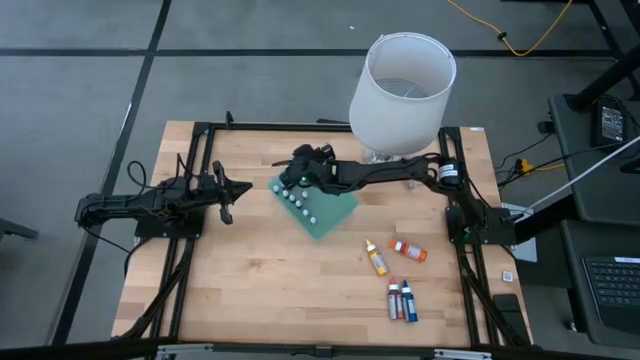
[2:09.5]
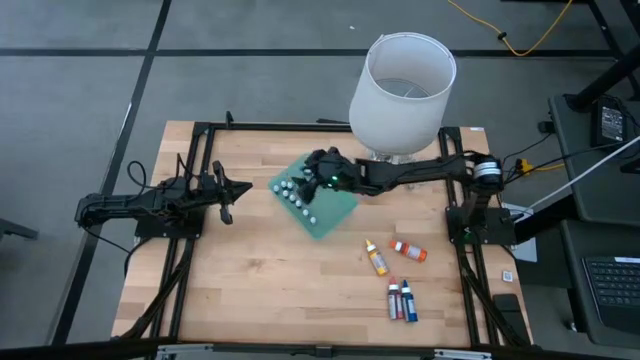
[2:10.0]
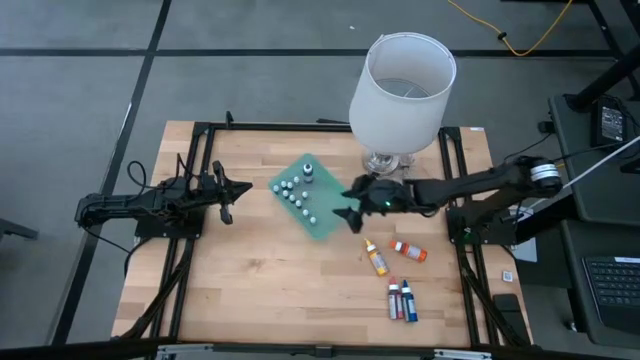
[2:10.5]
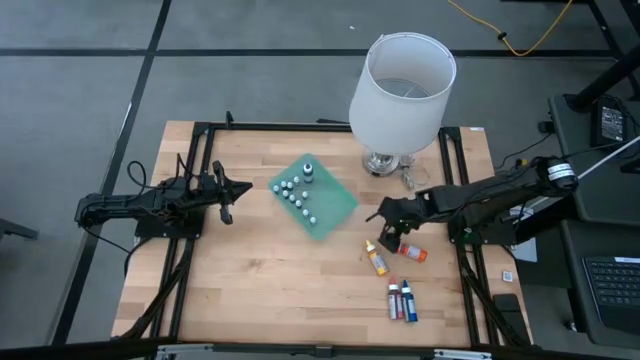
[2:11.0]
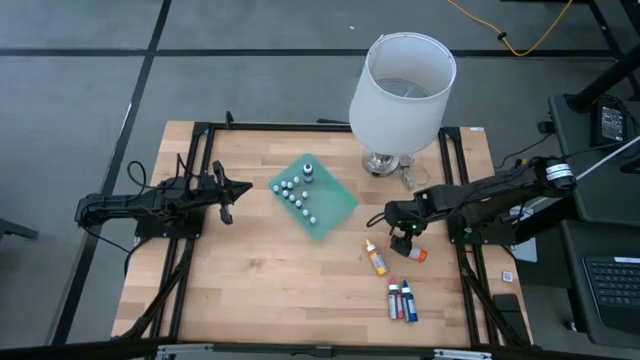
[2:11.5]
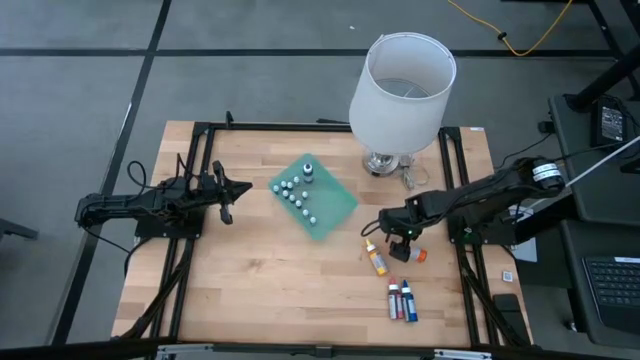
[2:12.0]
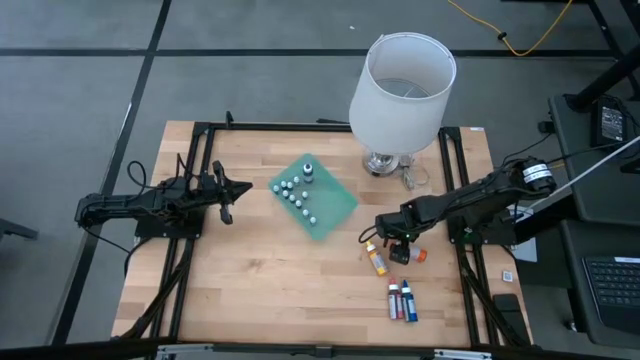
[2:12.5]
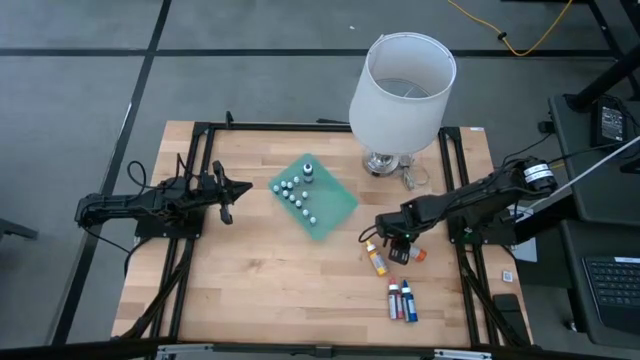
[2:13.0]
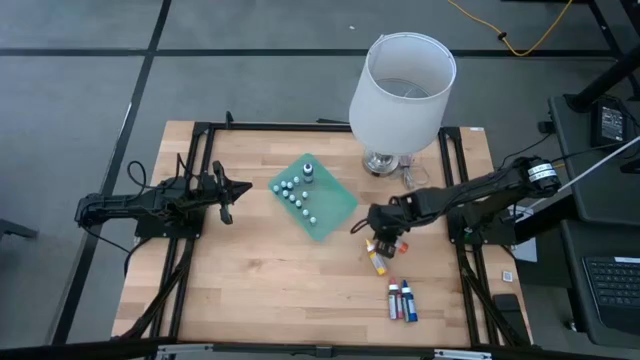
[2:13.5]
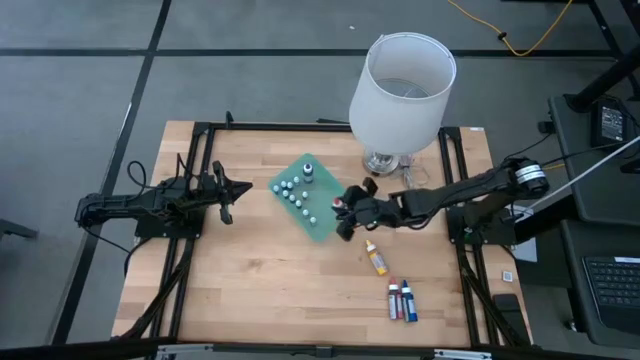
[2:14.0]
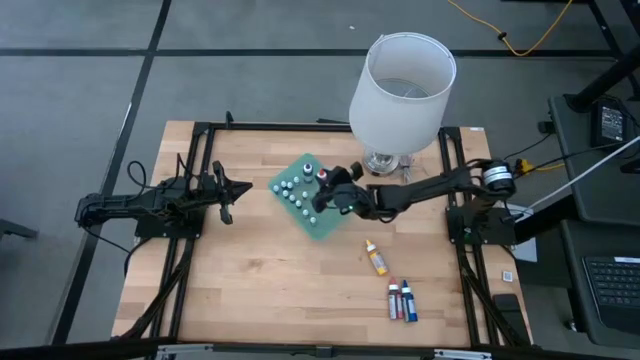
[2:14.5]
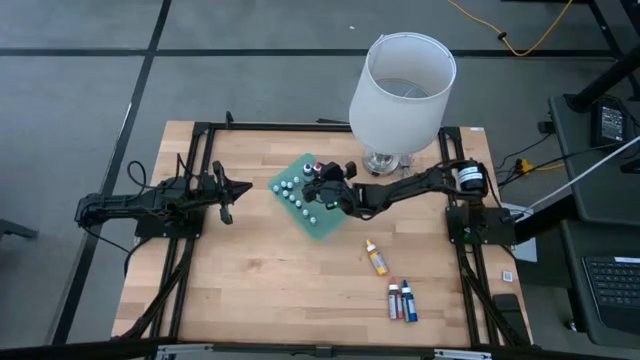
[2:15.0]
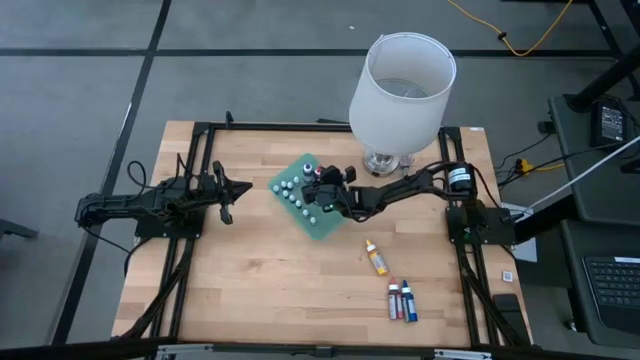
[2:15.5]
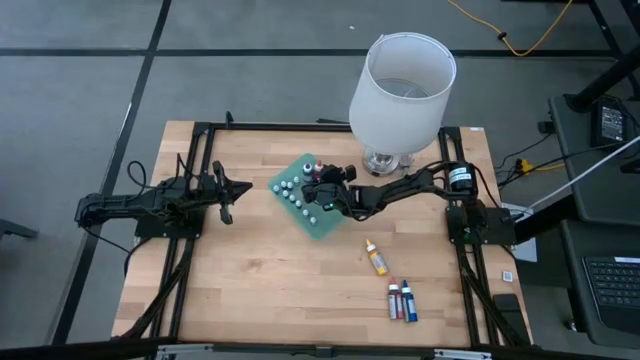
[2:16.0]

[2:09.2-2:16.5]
Task: Pick & Place food coloring
Put the large orange food coloring bottle into the green bin

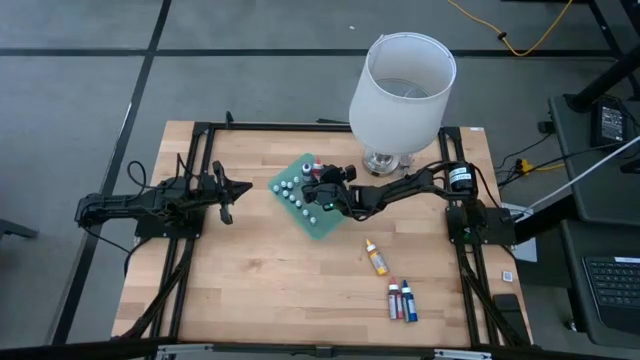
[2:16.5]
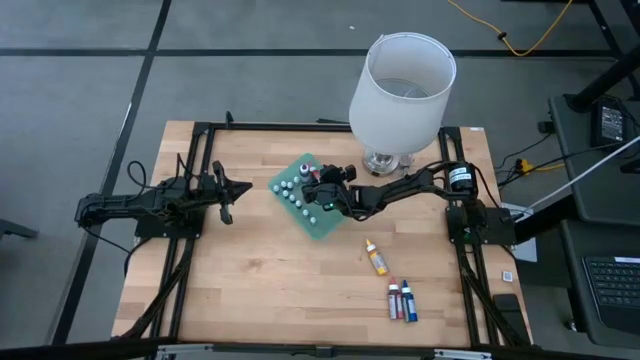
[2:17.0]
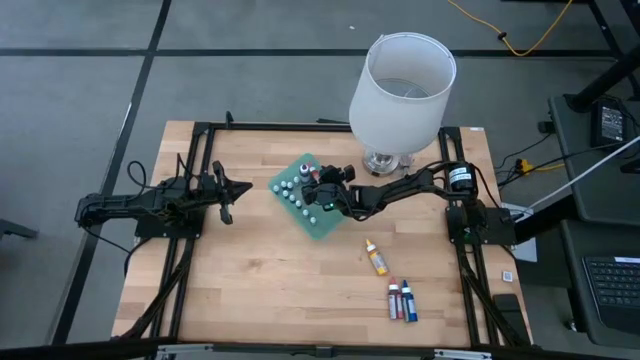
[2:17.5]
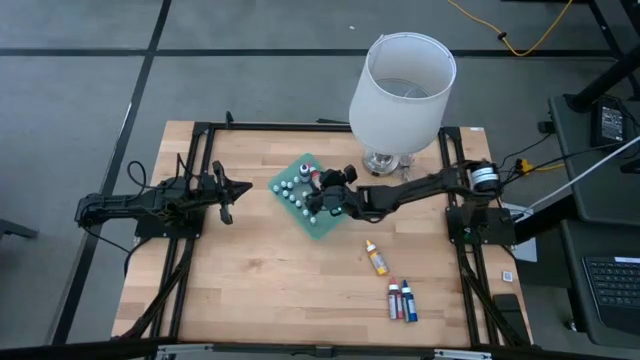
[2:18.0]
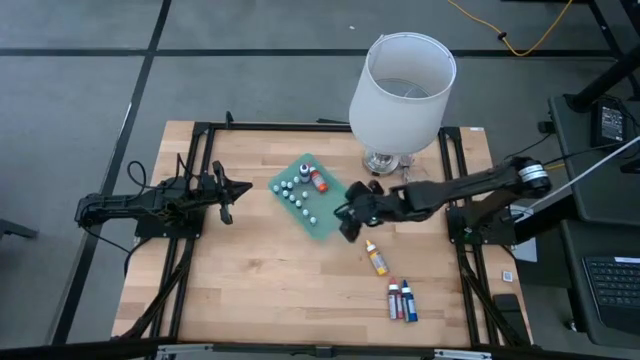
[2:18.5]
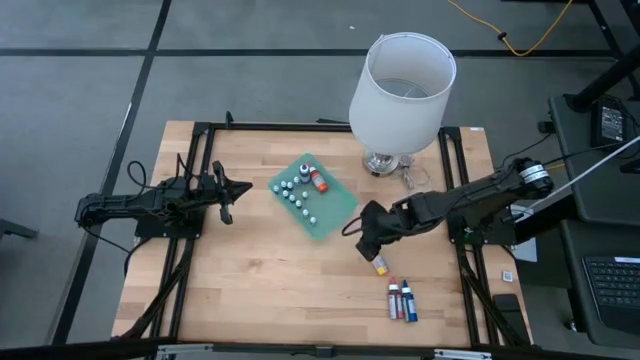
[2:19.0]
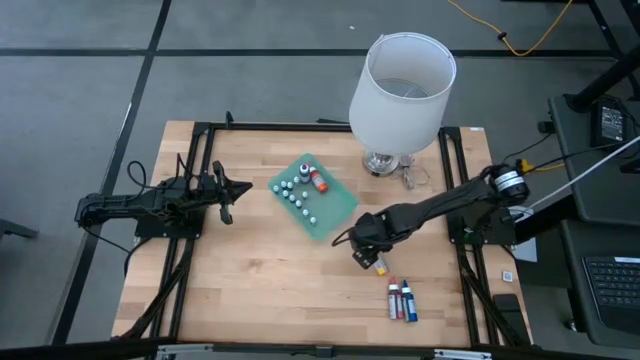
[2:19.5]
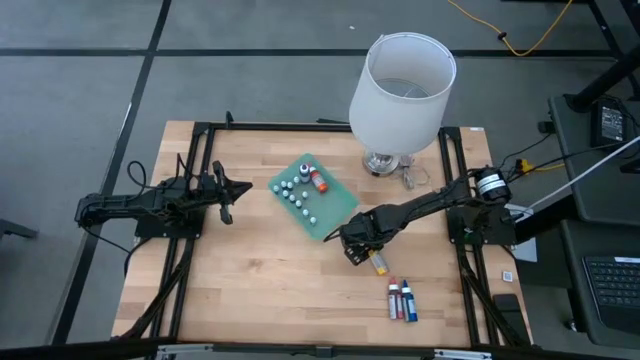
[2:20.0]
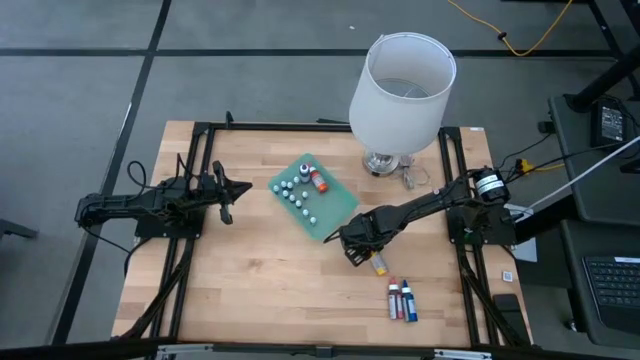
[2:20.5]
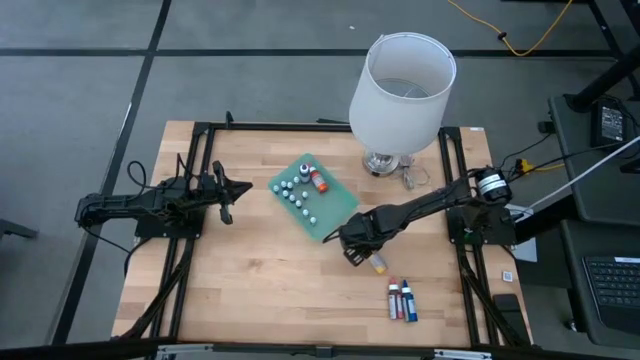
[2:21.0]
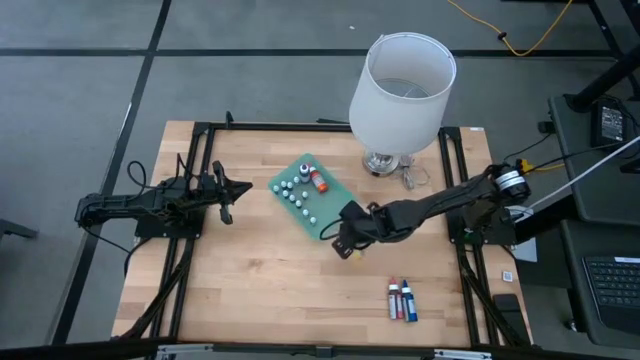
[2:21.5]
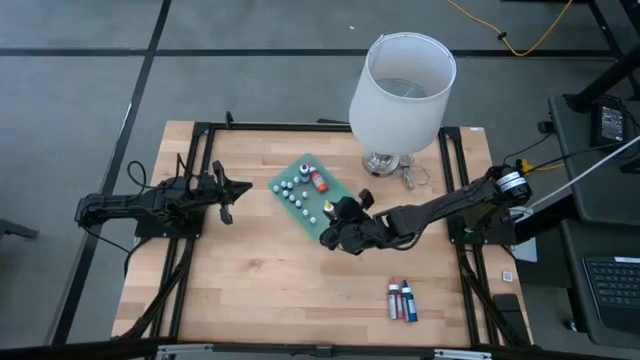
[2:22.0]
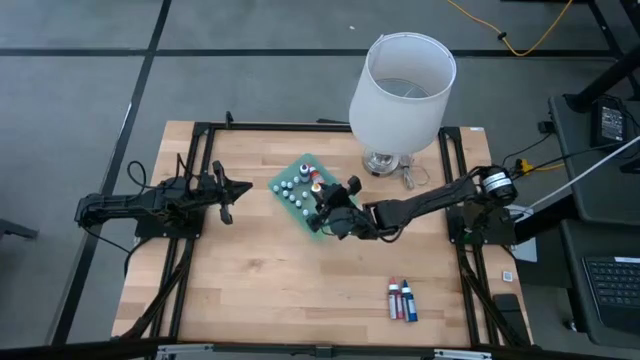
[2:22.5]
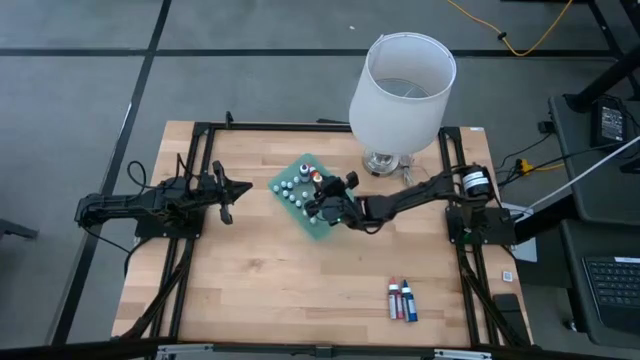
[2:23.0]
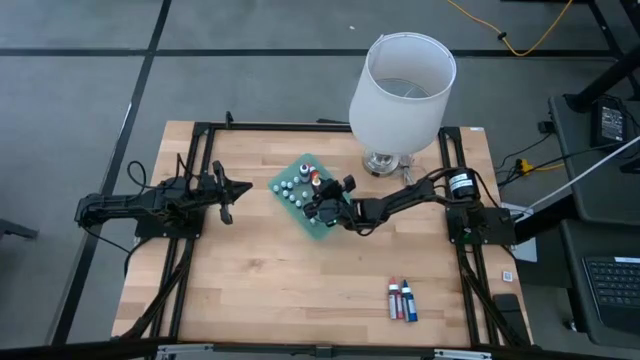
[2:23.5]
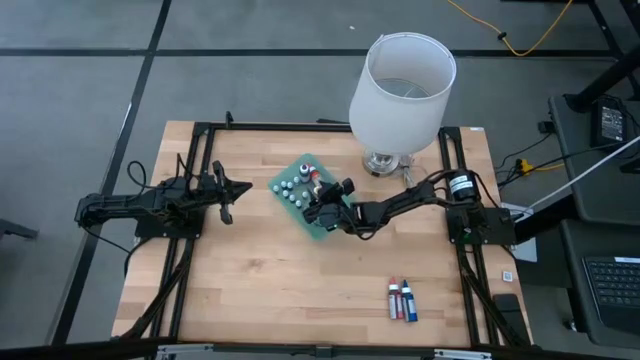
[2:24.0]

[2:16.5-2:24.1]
Put the large yellow food coloring bottle into the green bin

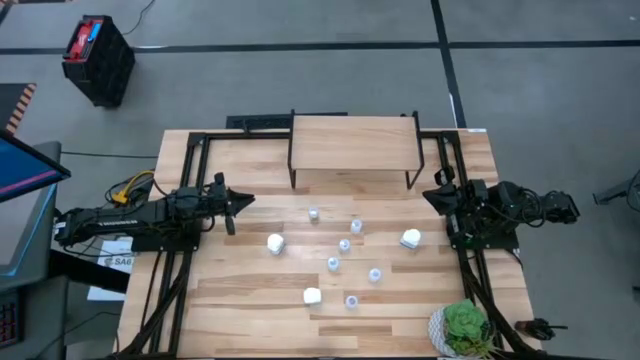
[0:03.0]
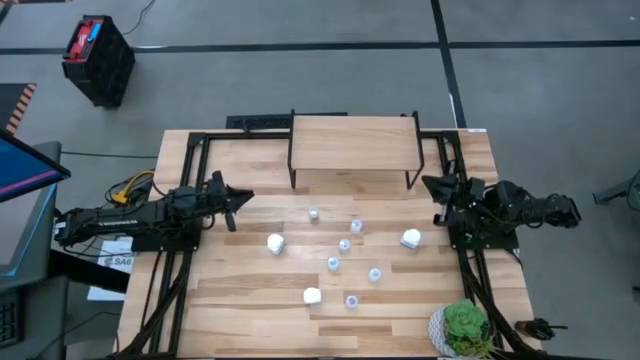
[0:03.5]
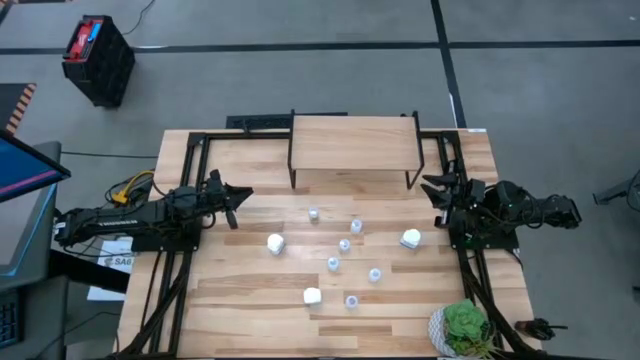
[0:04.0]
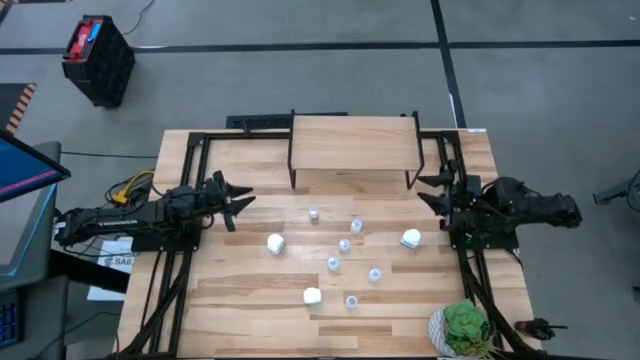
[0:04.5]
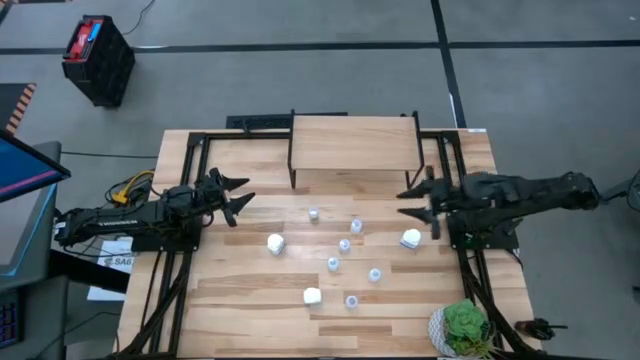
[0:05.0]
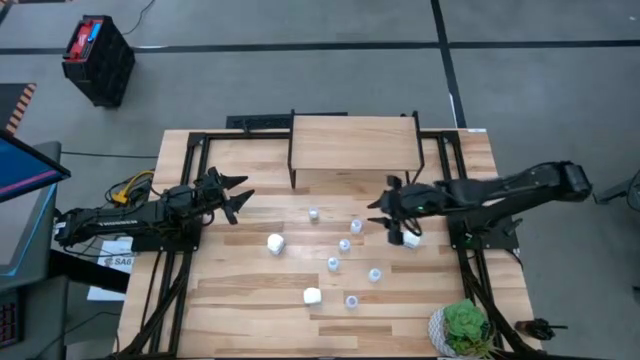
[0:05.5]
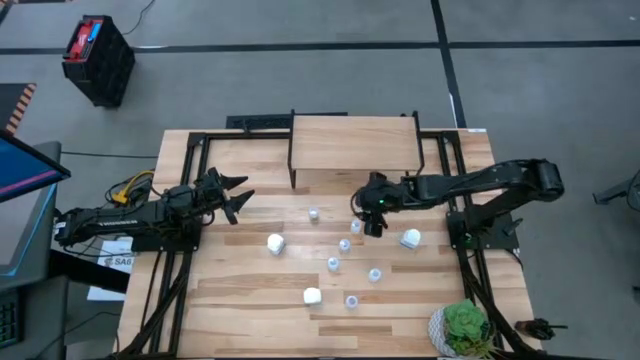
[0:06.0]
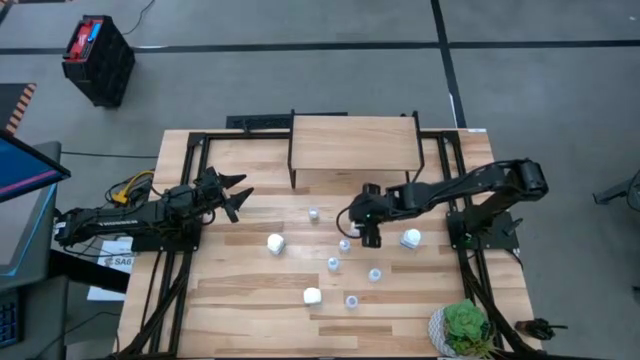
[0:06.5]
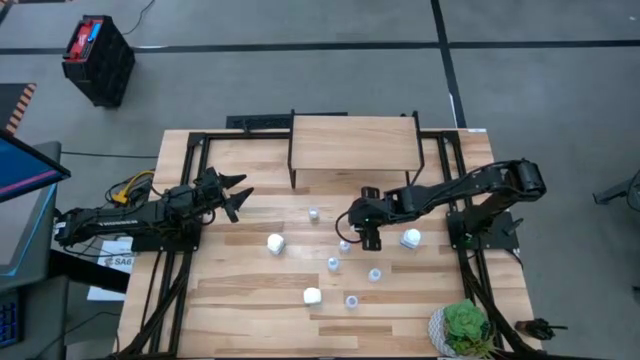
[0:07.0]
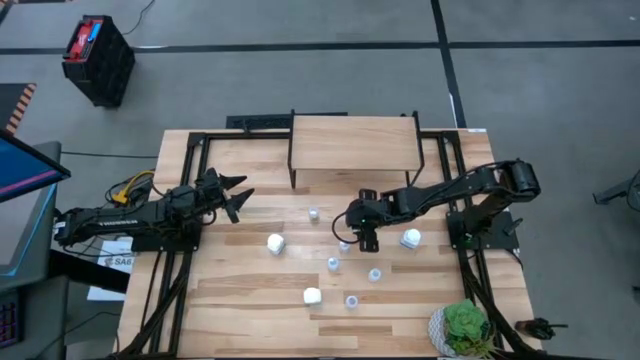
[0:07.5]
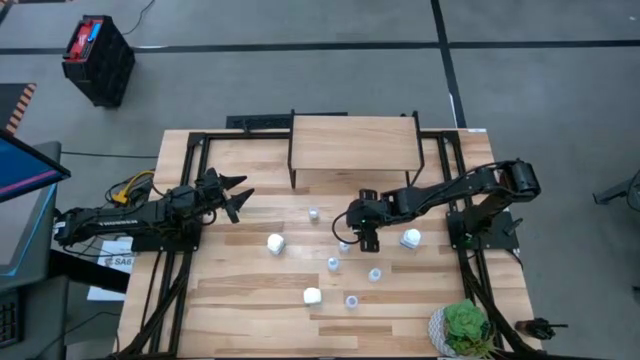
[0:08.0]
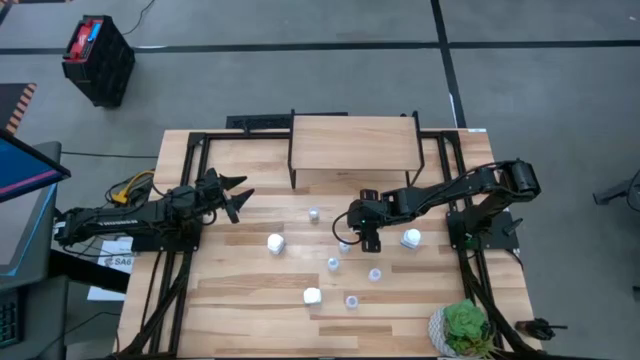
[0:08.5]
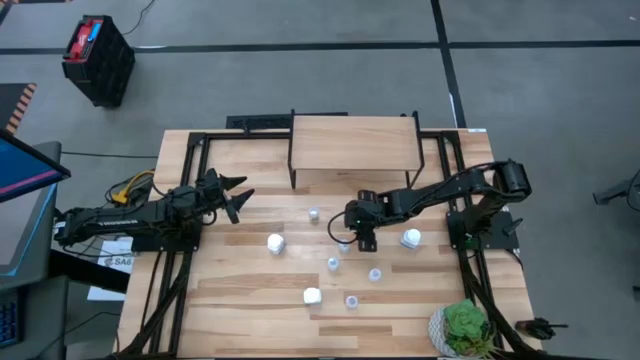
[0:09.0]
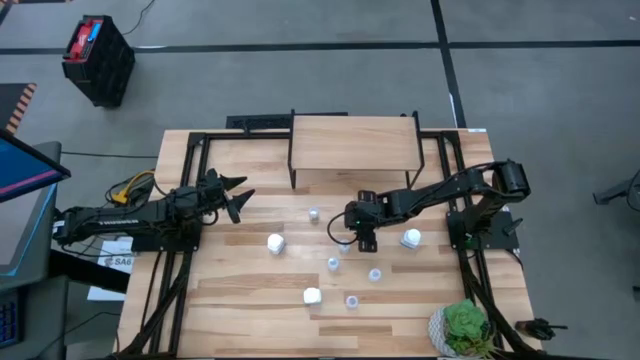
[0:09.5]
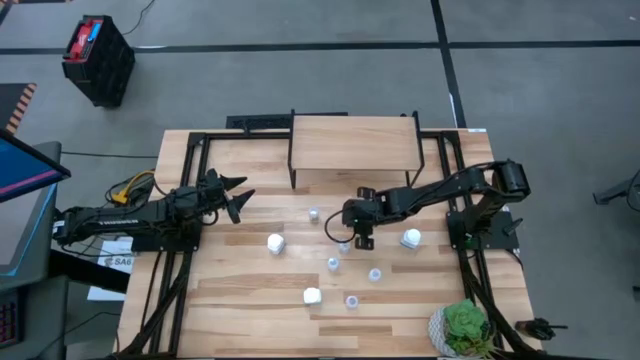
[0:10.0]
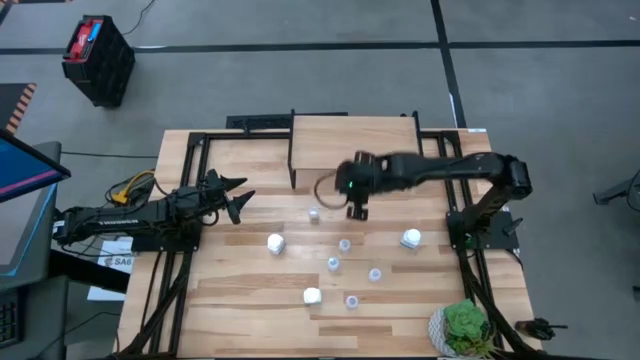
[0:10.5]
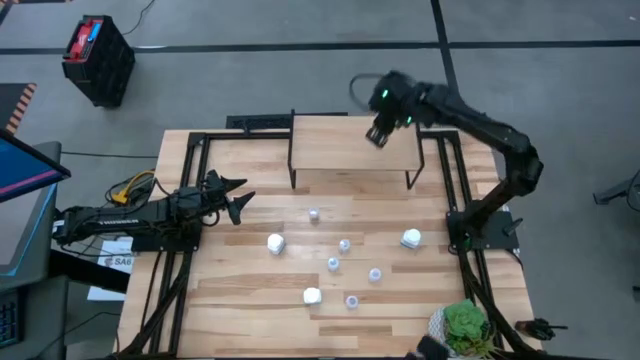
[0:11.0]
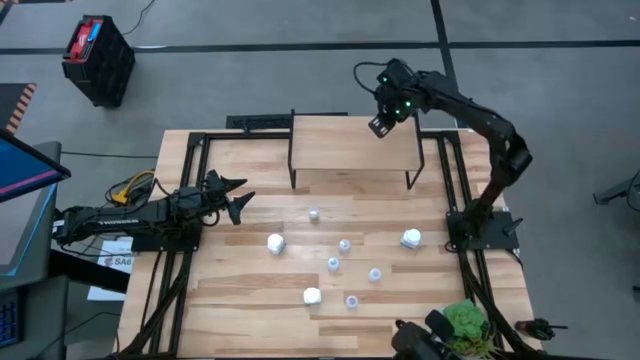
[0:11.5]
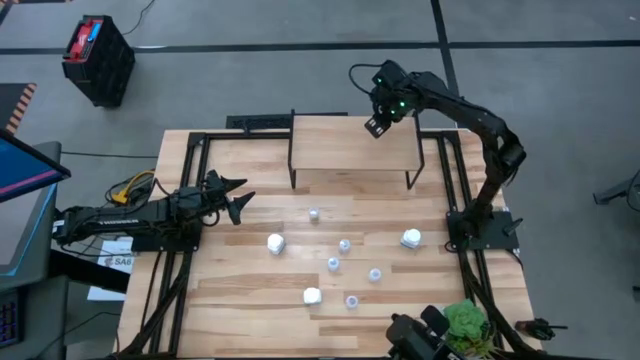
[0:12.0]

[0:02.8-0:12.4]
Task: Pick and place medicine bottles onto shelf by color
Put the top white pill bottle on the shelf
